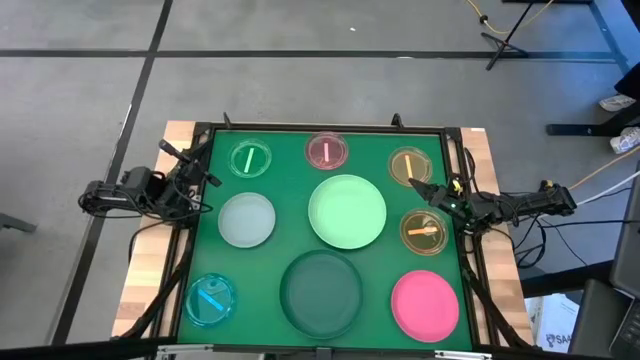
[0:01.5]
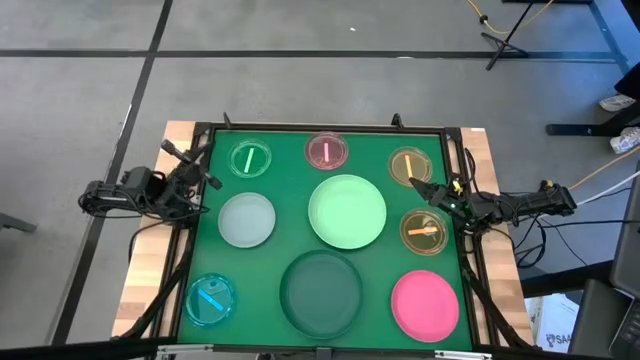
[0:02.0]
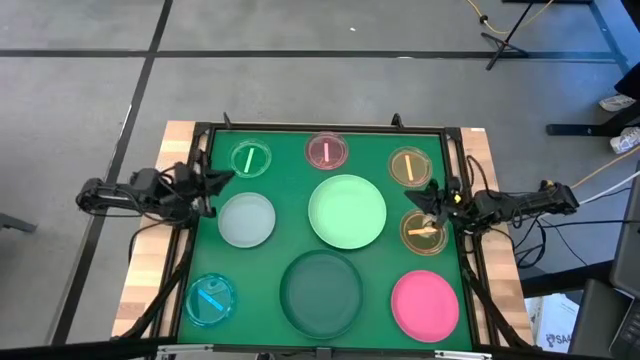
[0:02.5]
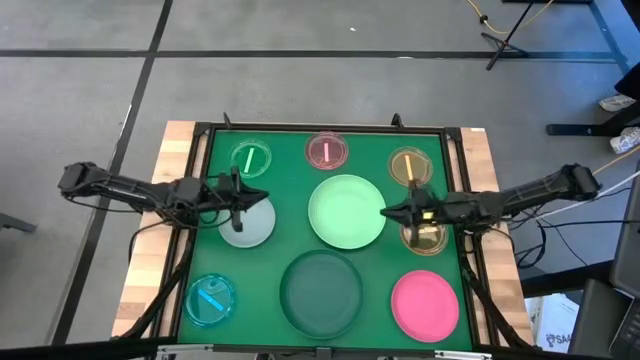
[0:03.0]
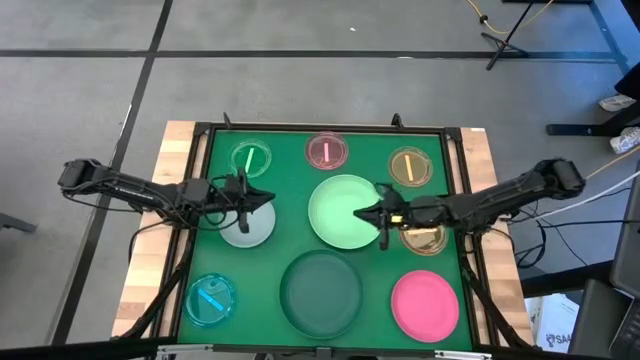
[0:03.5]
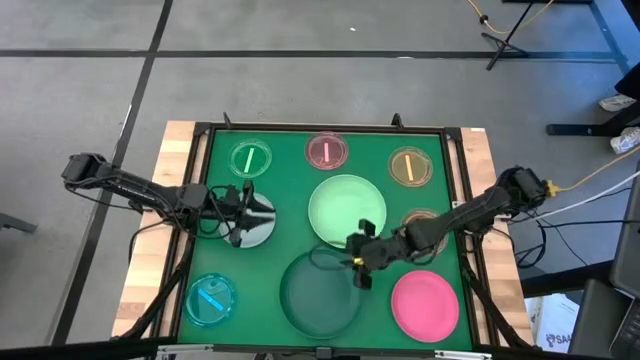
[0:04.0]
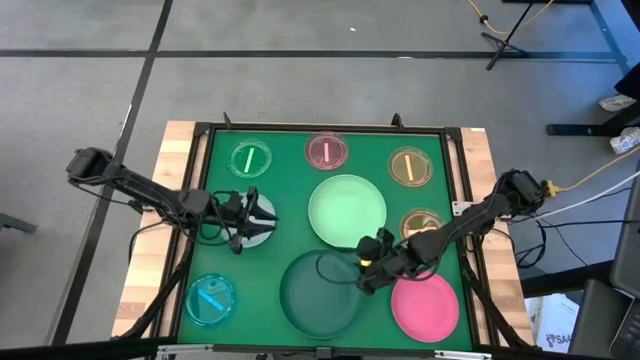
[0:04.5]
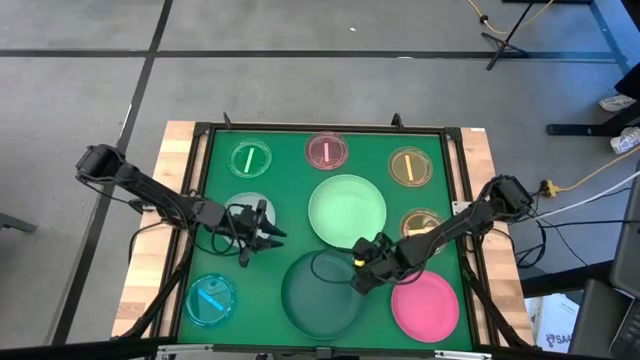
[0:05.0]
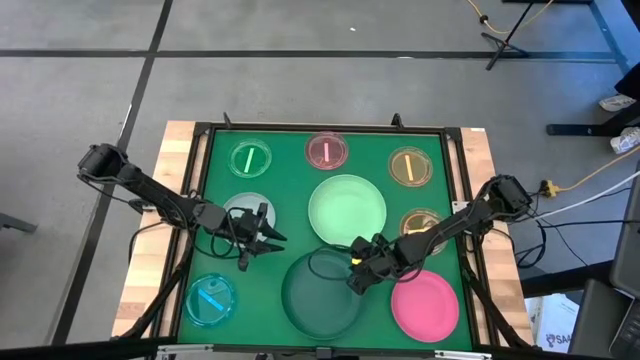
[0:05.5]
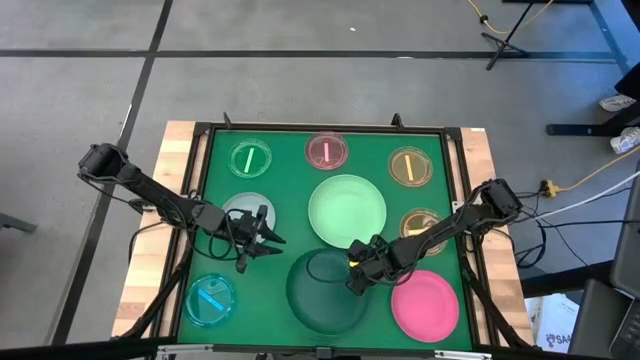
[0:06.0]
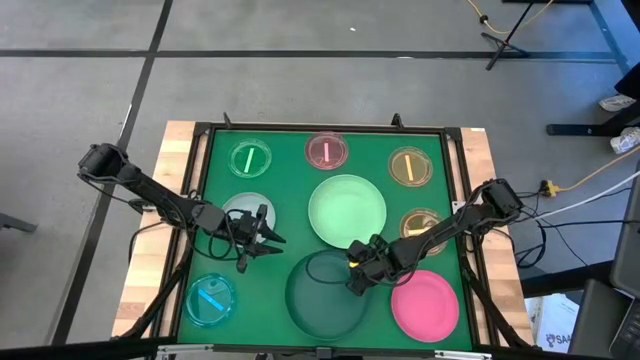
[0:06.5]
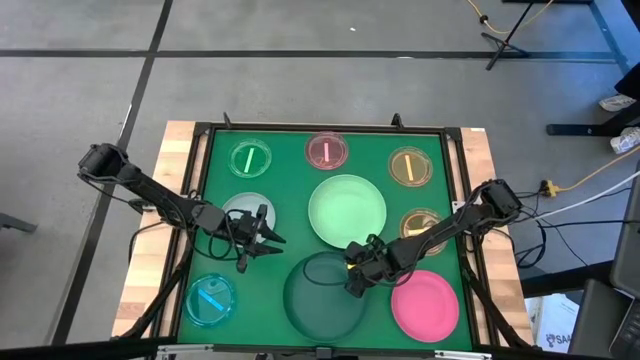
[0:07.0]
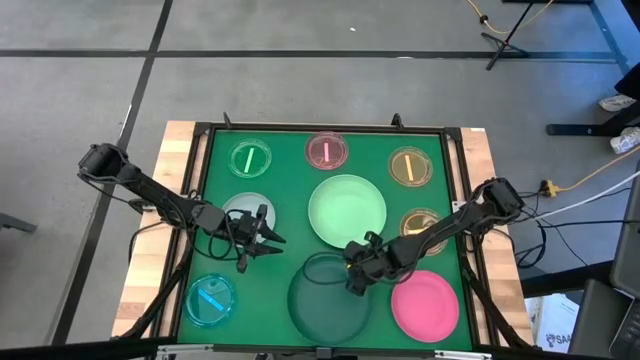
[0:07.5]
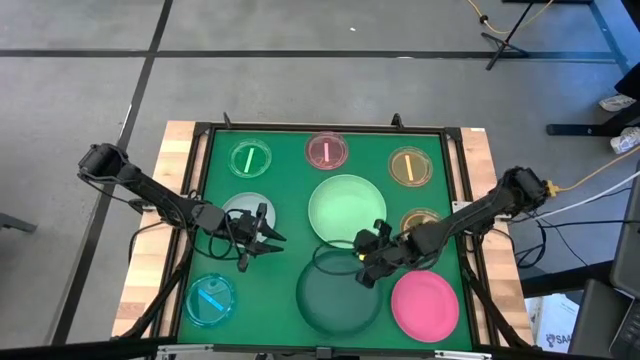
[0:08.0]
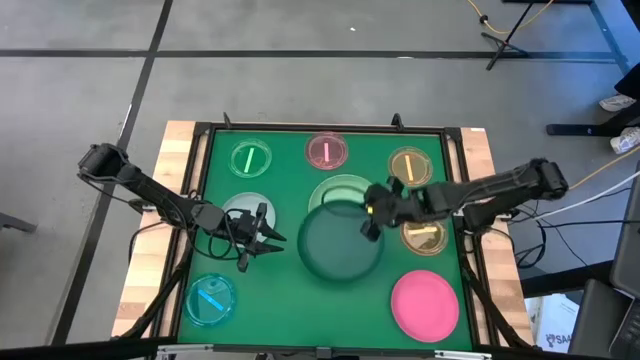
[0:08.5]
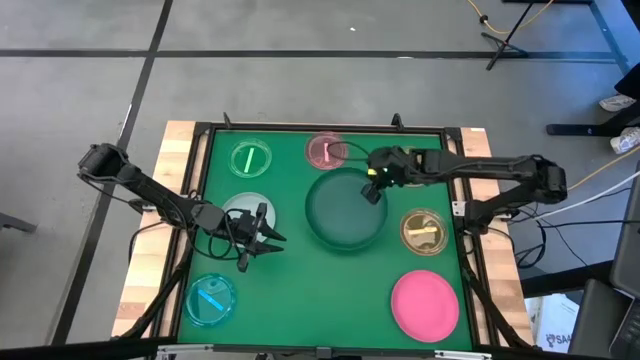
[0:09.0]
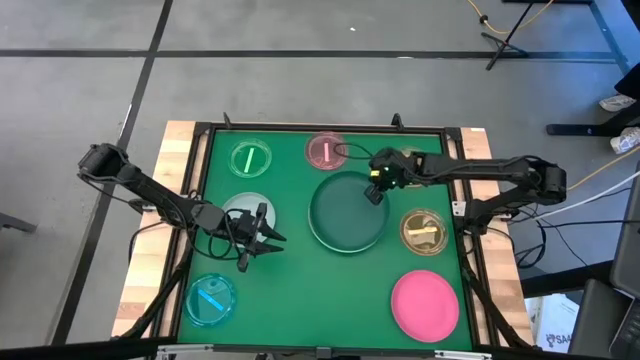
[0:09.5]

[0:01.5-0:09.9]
Task: Stack plastic plates
Stack the dark green plate on top of the light green plate

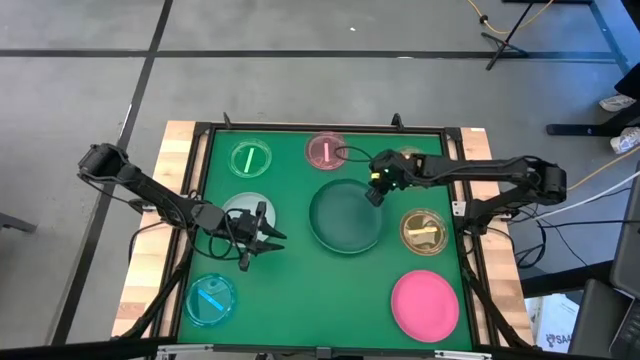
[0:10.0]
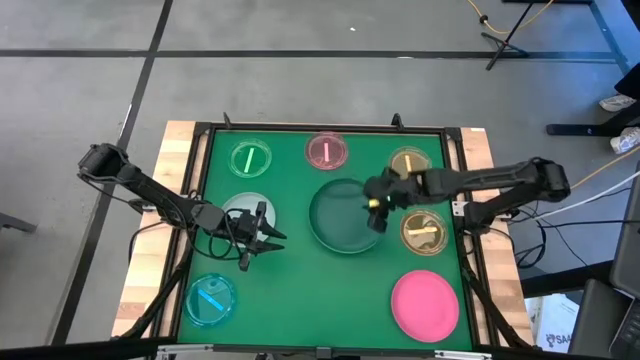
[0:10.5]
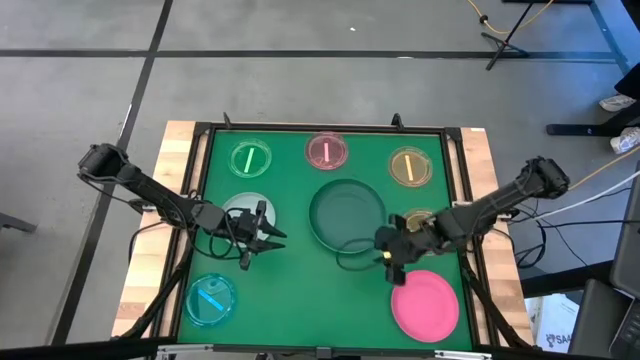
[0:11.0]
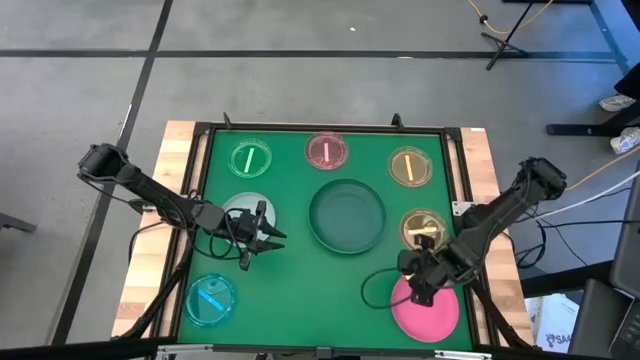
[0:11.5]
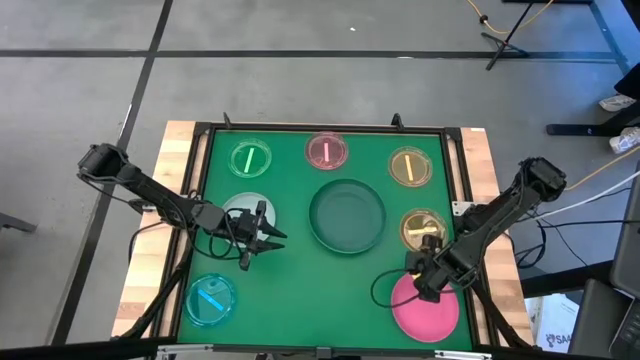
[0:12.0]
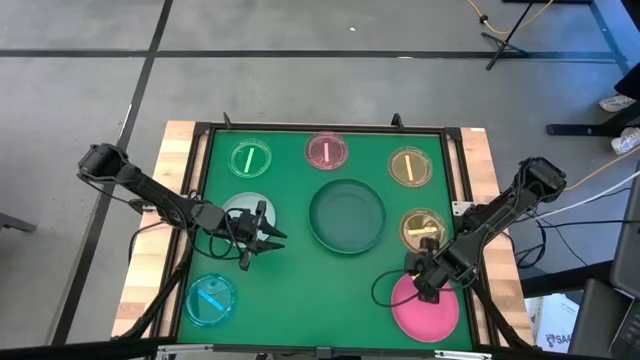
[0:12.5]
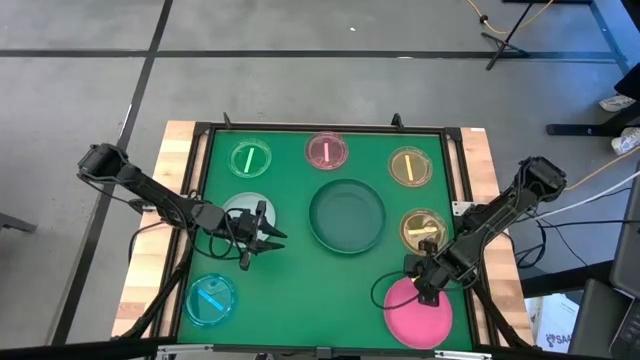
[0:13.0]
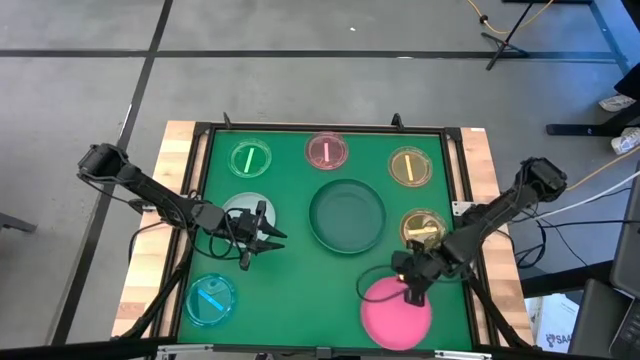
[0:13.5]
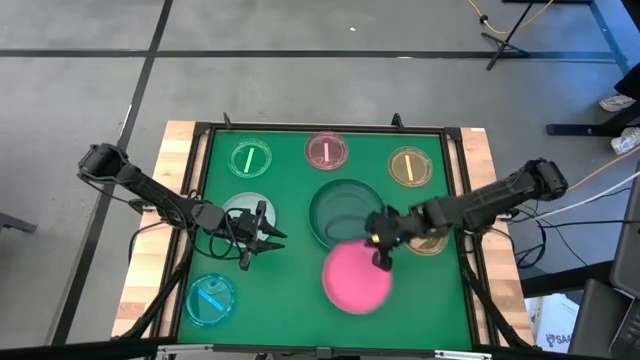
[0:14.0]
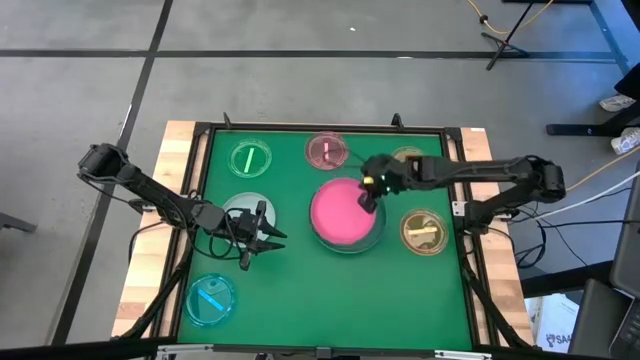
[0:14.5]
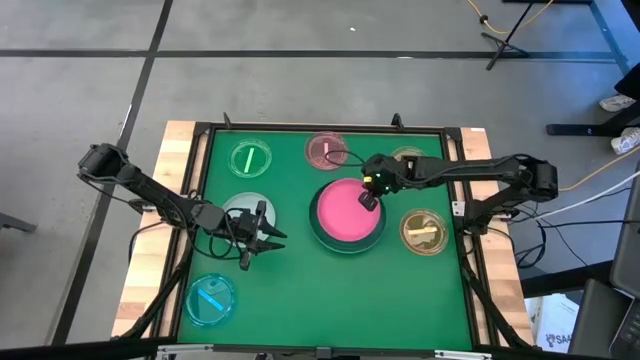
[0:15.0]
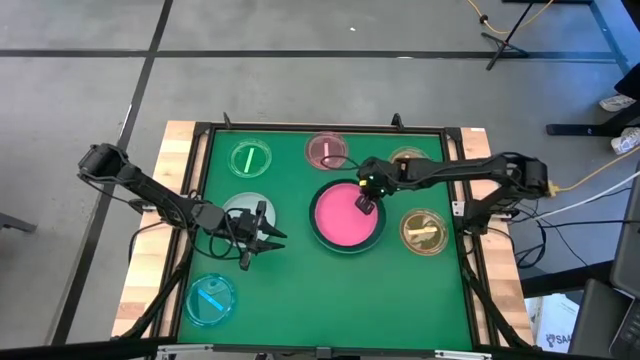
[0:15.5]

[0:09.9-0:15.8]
Stack the pink plate on top of the dark green plate

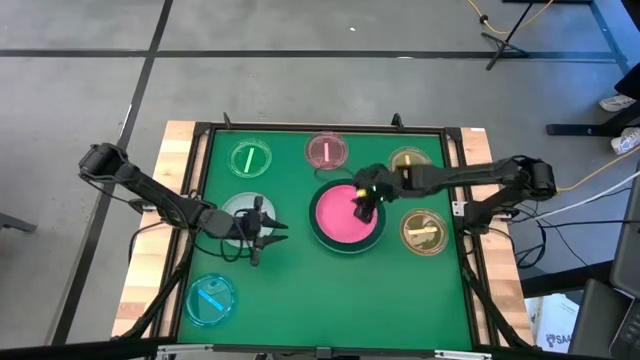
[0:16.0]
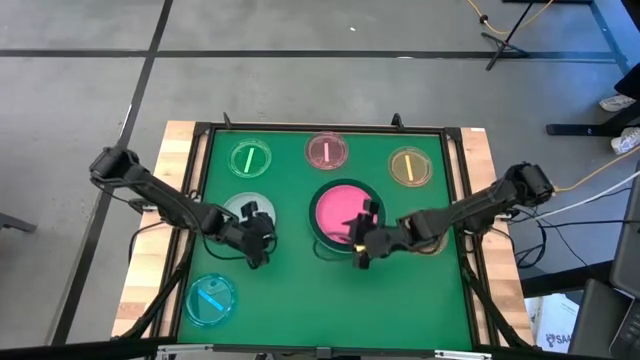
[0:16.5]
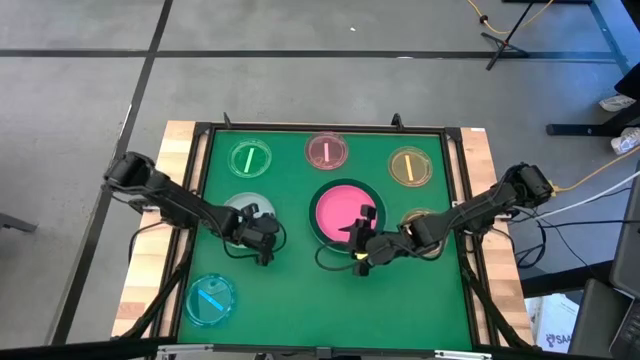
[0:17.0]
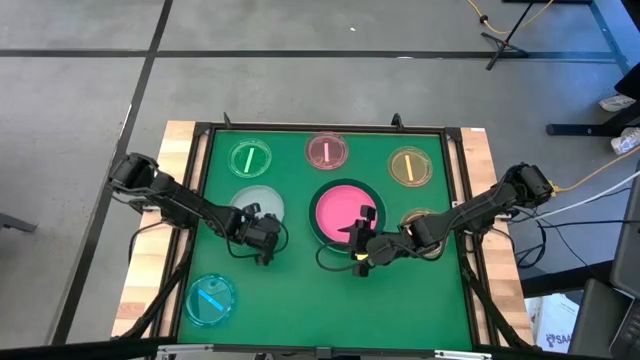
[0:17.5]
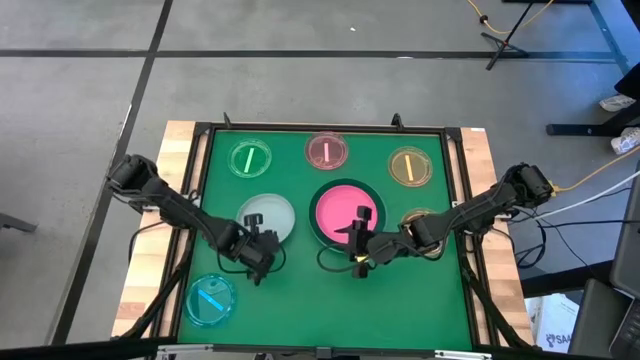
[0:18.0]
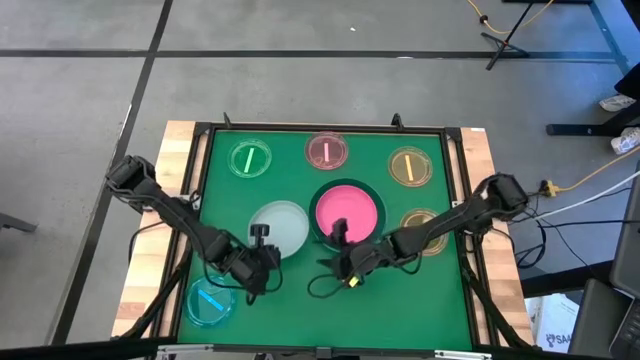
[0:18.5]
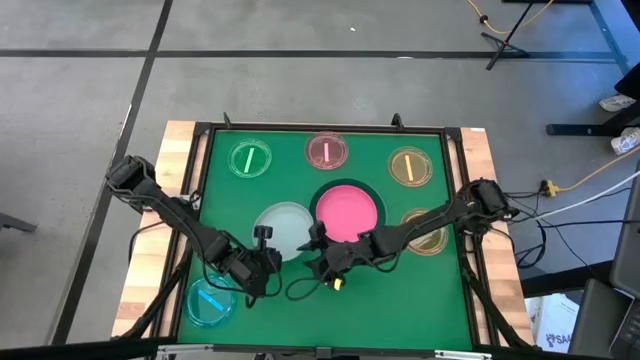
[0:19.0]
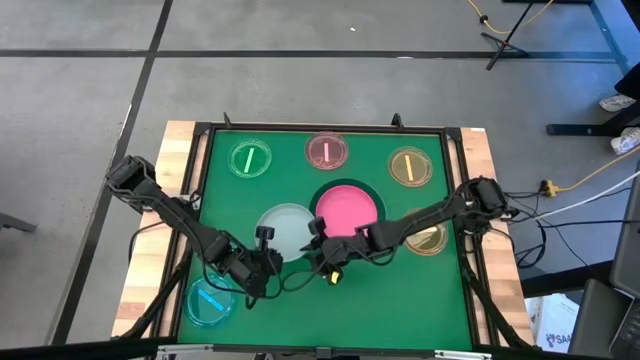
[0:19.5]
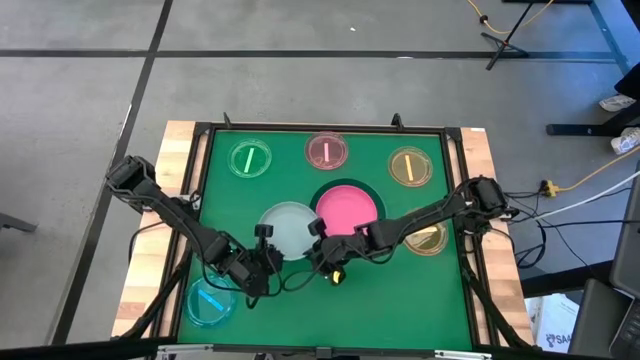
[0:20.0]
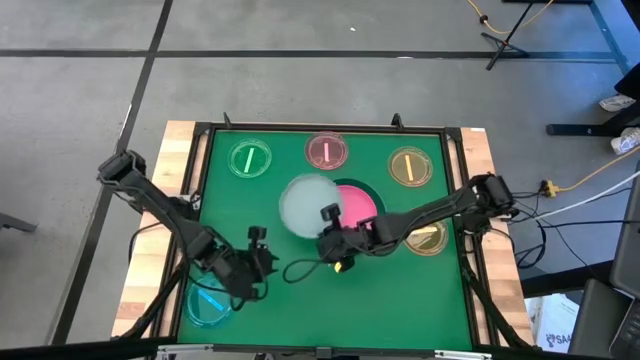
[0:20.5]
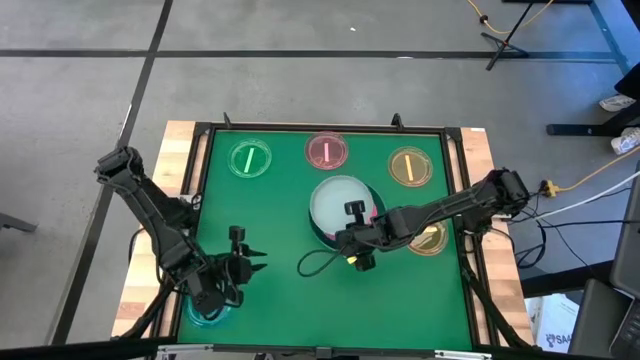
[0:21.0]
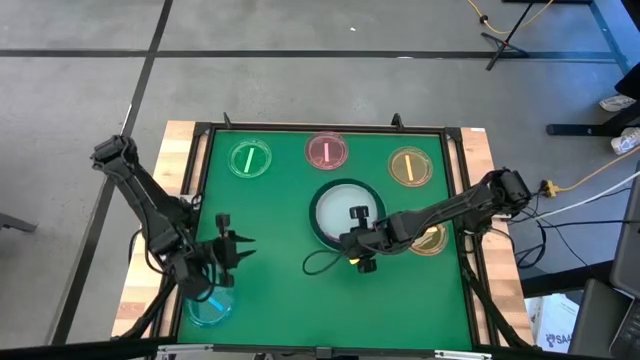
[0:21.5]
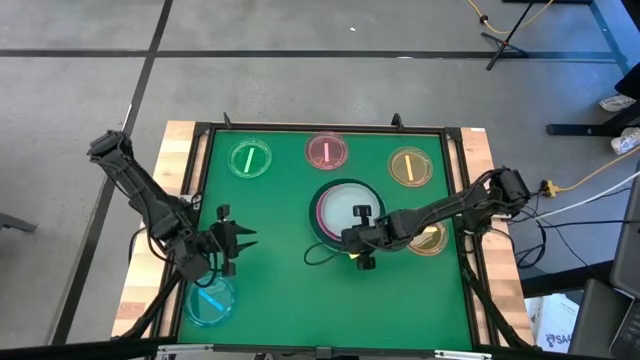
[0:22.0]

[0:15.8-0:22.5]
Stack the light blue plate on top of the pink plate
